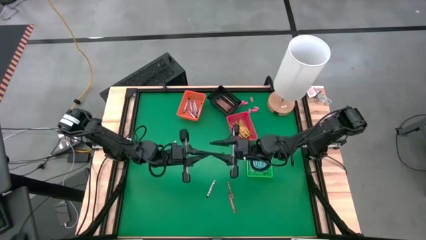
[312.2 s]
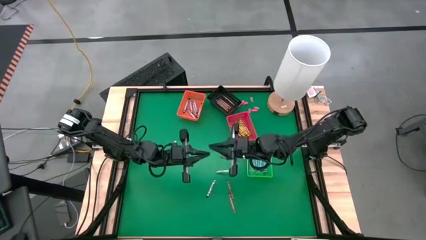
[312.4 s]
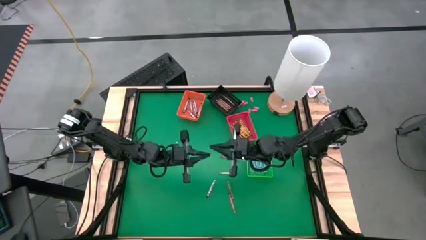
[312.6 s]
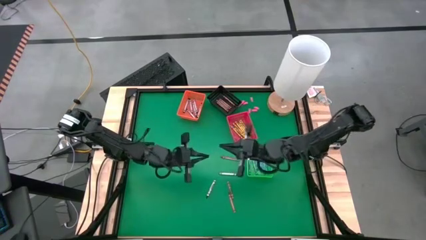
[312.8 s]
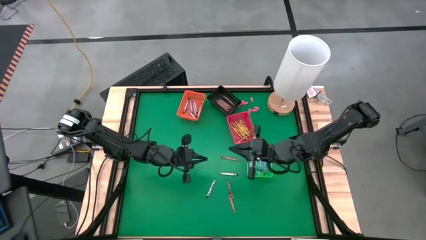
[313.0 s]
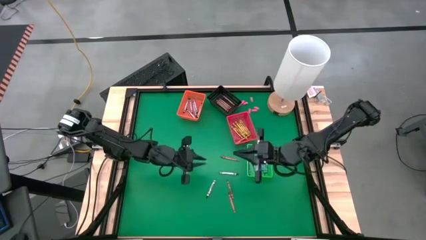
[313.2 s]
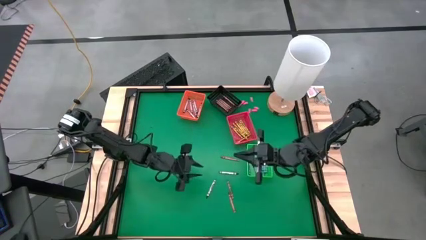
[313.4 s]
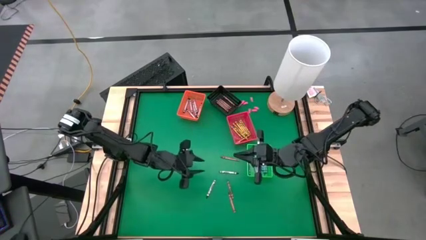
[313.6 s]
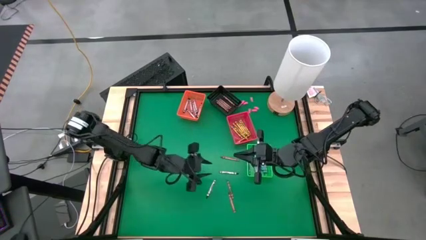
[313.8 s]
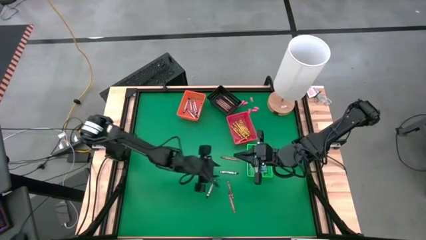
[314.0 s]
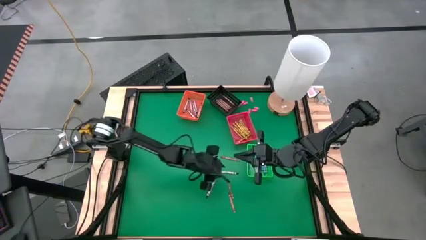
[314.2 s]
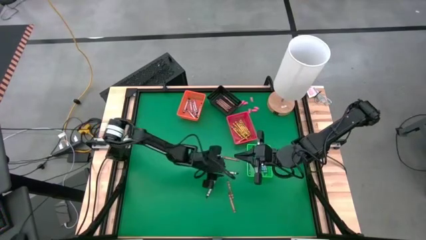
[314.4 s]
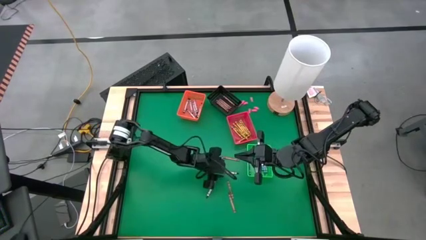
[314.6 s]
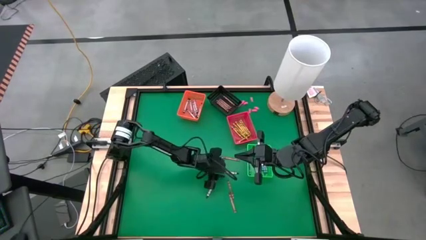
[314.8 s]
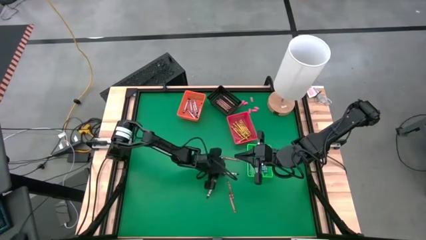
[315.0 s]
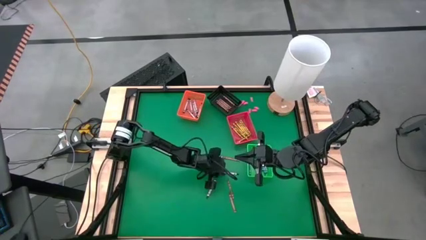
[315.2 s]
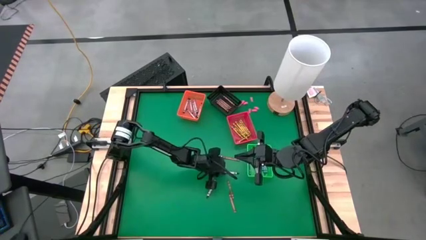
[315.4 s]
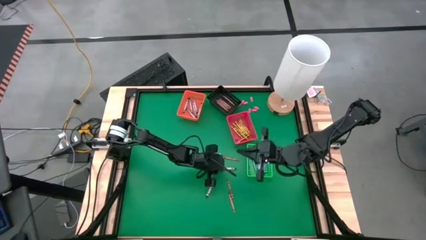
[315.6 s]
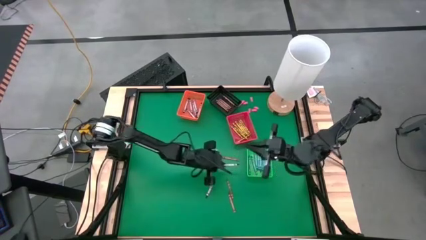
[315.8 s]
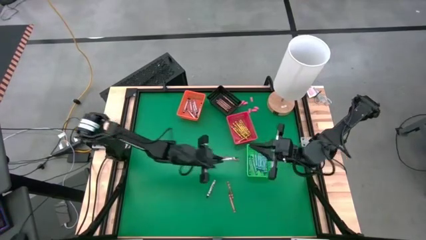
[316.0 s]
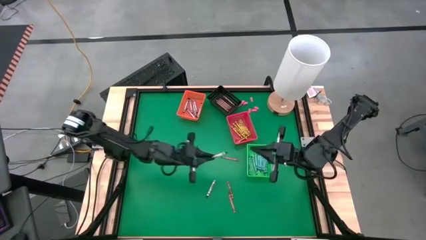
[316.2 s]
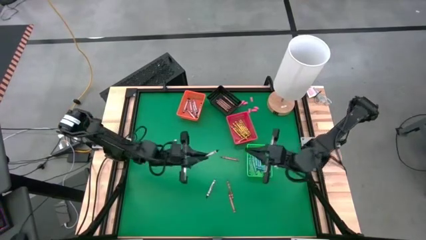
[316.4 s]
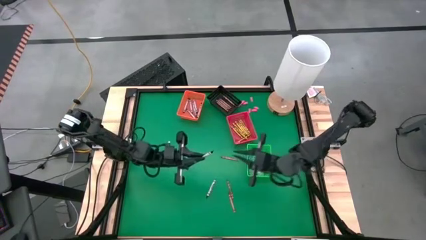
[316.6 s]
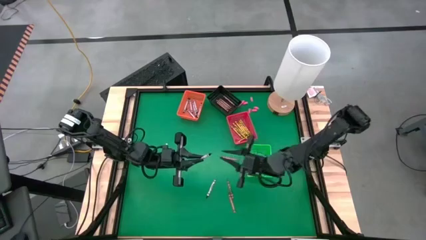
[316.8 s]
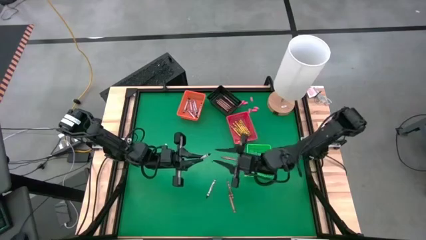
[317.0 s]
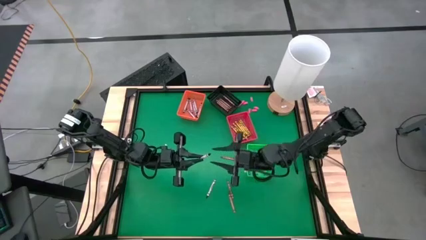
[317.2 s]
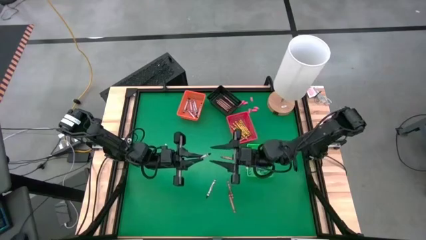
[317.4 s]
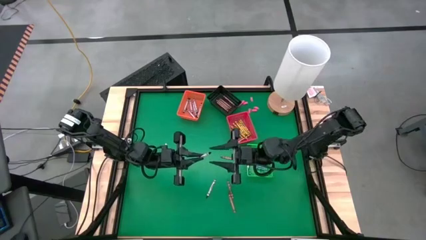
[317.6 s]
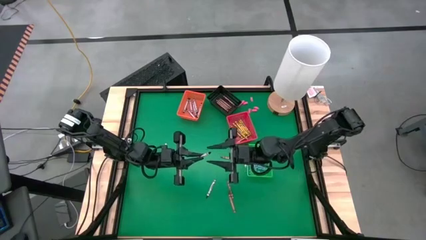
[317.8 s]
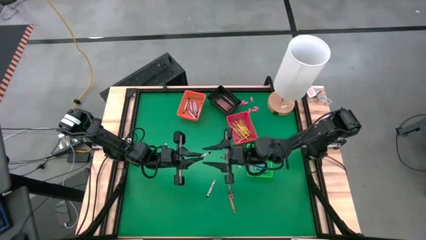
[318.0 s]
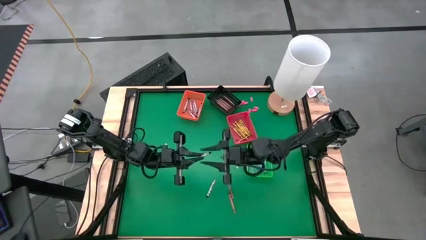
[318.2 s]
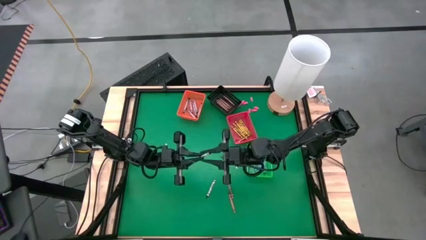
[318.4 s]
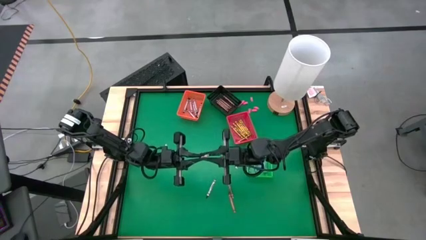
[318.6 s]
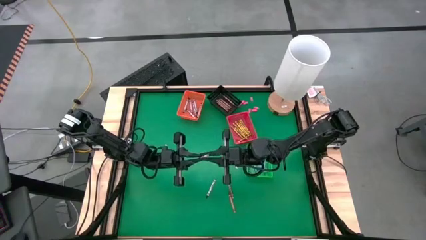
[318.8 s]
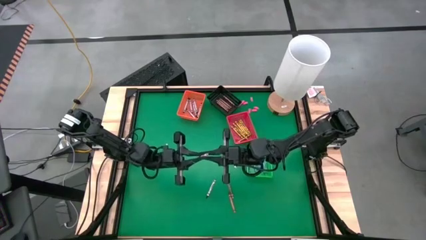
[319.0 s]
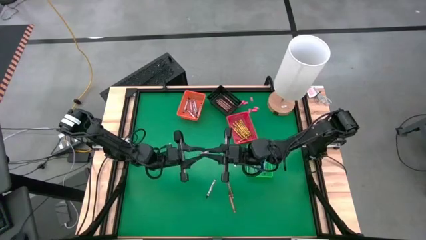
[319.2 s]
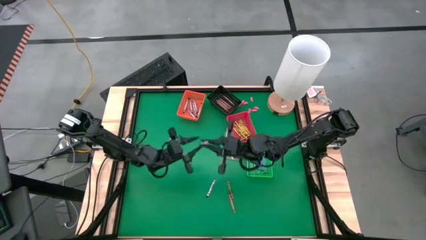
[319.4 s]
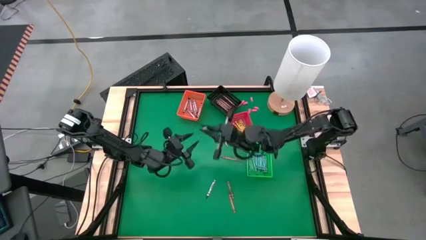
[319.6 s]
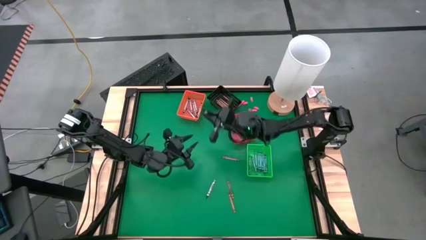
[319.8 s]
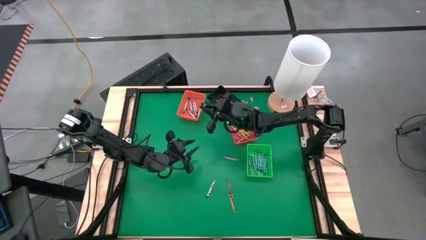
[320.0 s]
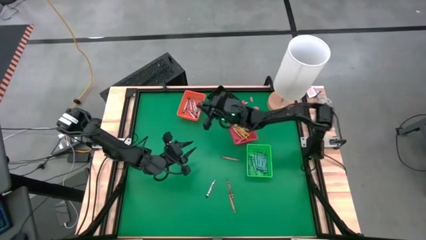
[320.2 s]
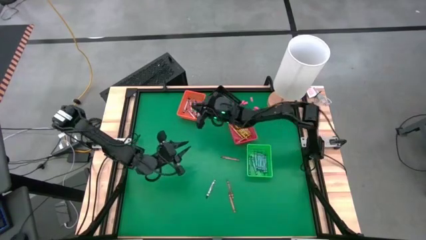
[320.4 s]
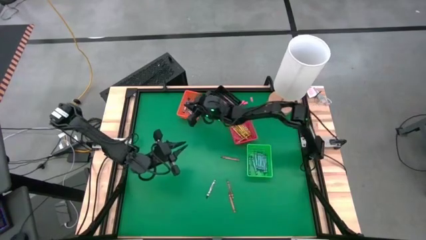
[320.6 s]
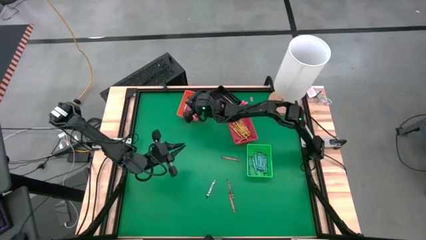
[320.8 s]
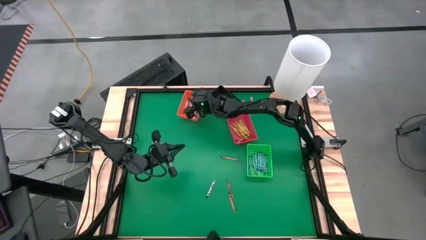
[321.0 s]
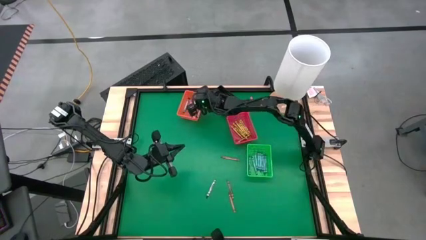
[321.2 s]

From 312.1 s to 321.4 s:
Task: Sort crayons
Put the black crayon into the orange bin

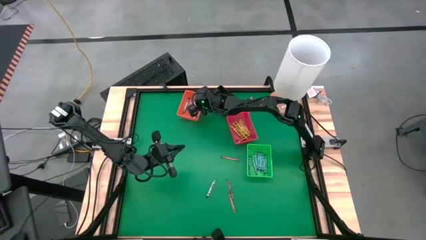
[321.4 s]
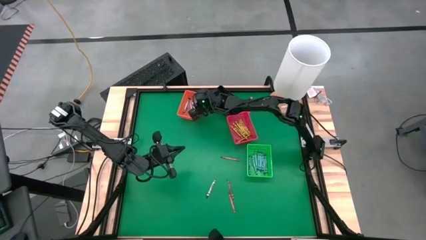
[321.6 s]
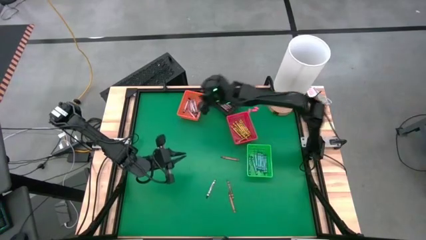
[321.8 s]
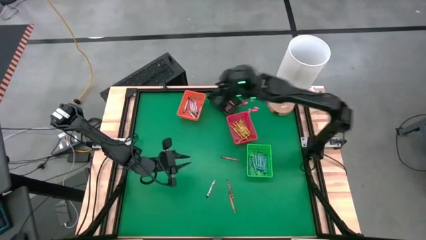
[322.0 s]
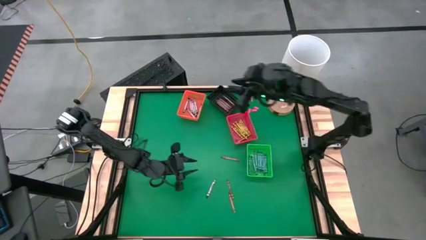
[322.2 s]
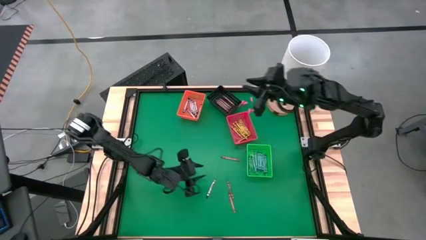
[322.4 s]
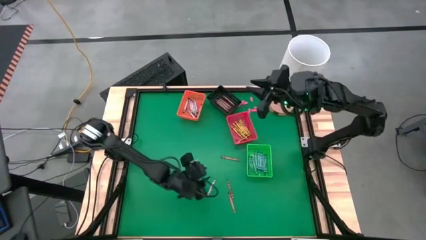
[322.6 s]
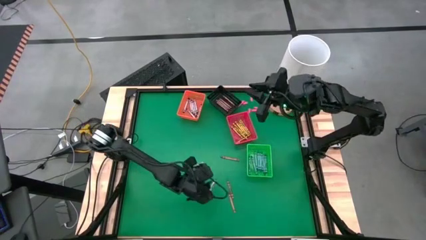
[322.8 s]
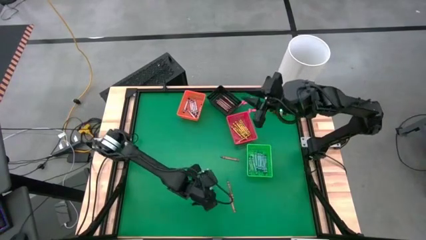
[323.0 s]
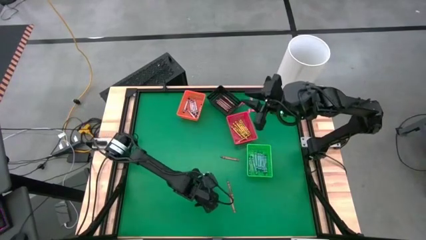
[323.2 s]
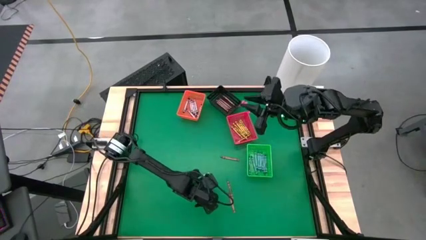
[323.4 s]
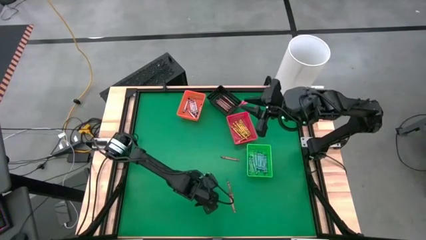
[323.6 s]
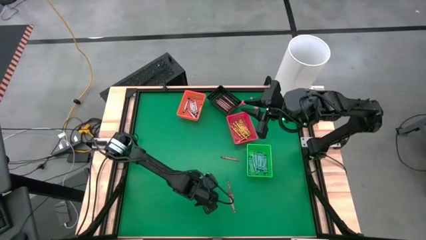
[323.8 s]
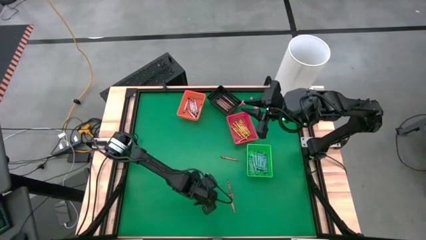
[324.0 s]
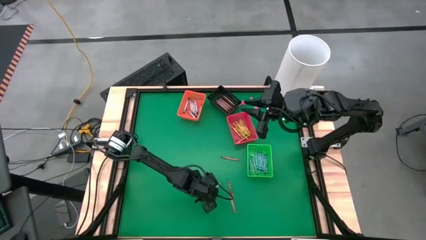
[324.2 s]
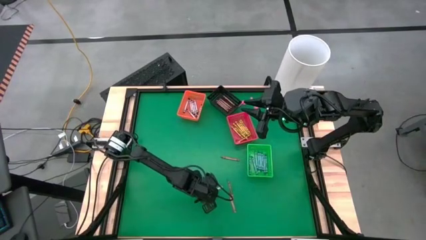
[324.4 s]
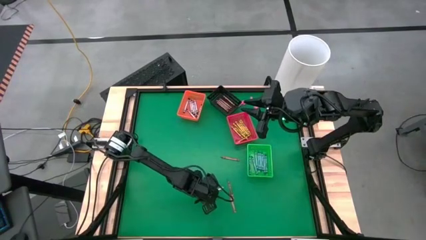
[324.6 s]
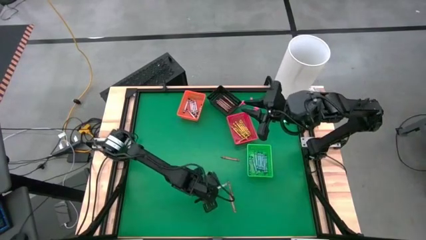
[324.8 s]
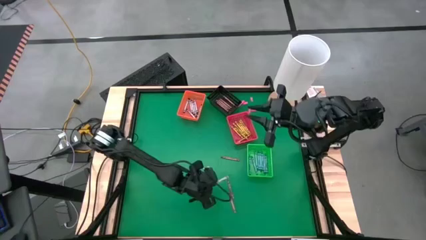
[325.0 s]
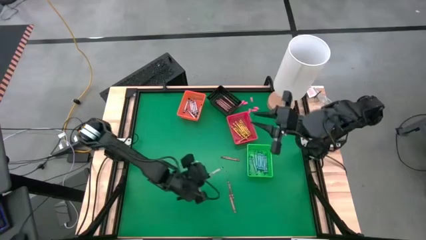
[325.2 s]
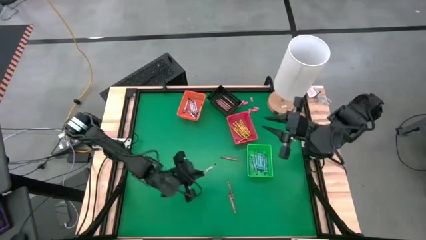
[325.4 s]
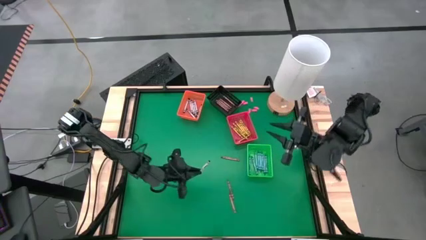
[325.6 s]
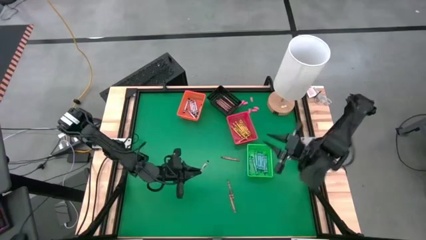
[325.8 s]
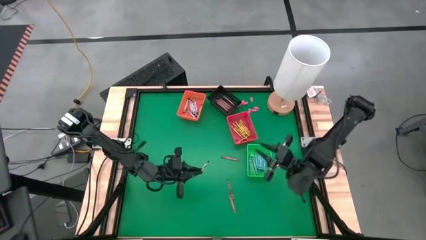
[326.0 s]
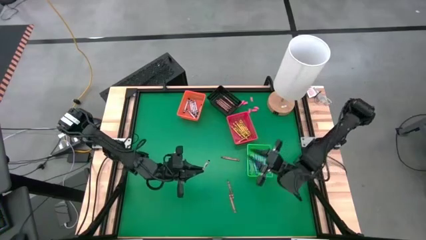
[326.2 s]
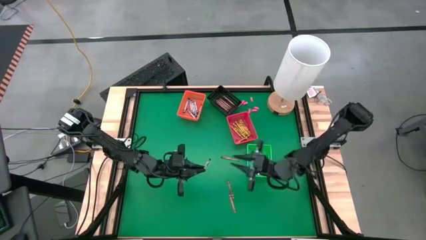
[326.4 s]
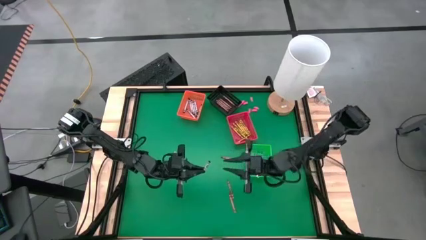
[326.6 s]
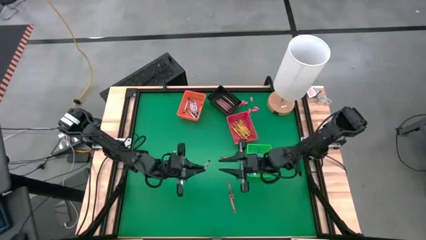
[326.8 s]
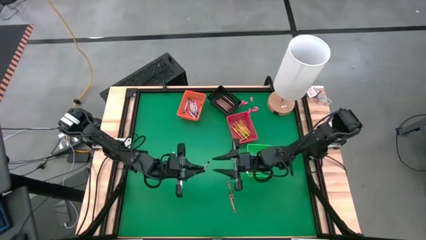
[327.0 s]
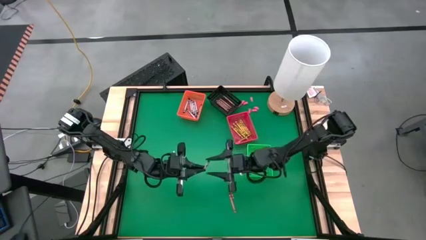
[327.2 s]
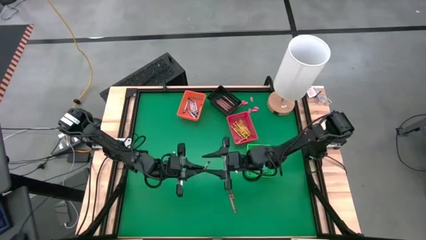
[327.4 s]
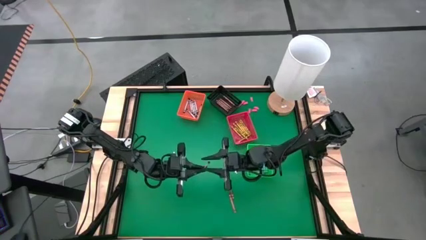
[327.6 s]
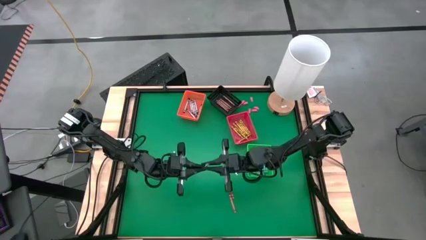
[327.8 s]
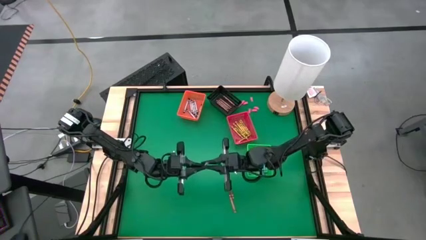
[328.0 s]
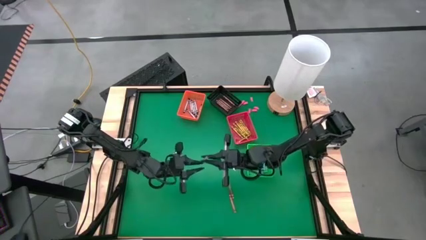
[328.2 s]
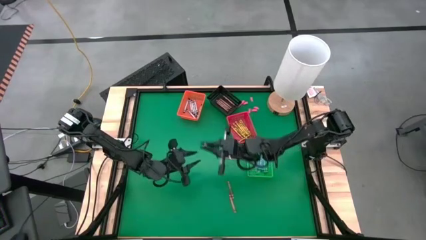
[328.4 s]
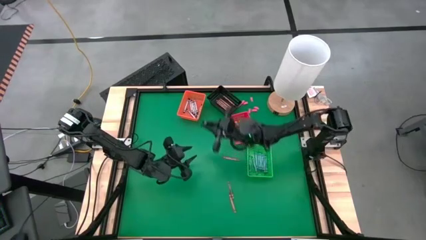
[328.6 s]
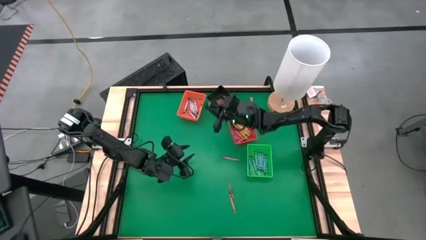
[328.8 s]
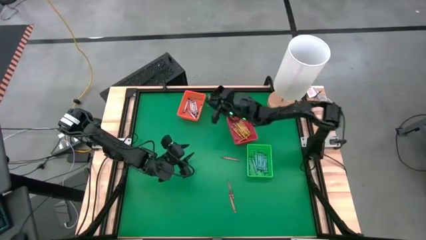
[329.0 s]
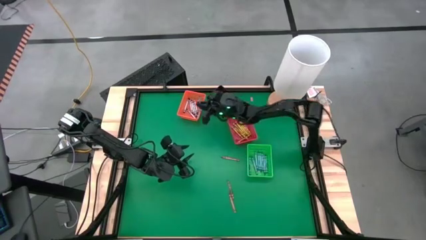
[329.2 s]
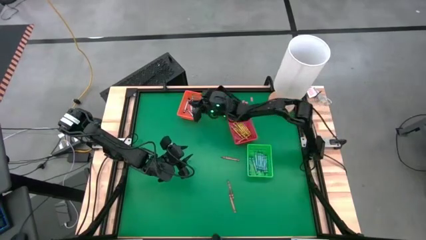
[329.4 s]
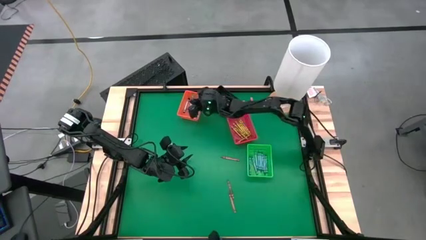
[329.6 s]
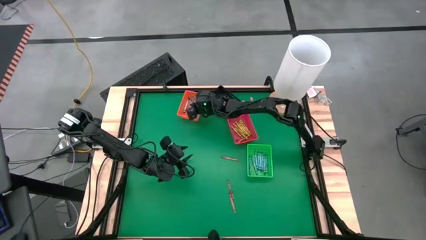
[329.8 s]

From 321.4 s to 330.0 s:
Put the black crayon into the orange bin
